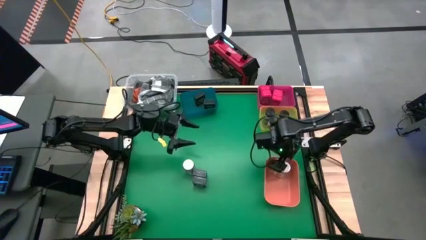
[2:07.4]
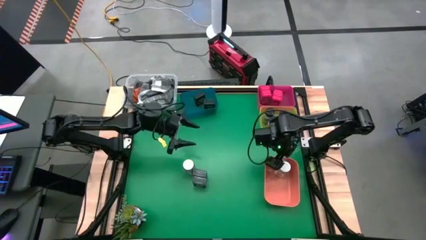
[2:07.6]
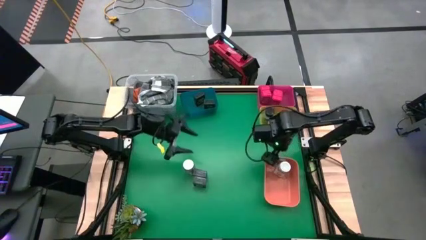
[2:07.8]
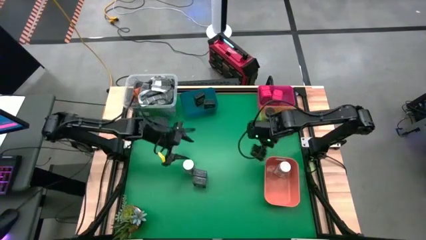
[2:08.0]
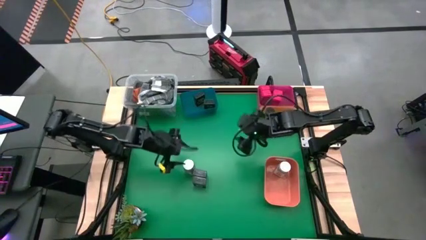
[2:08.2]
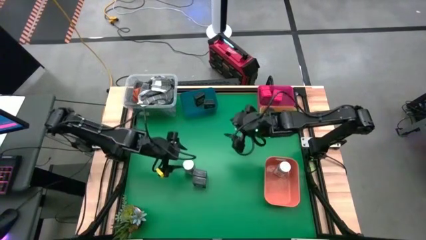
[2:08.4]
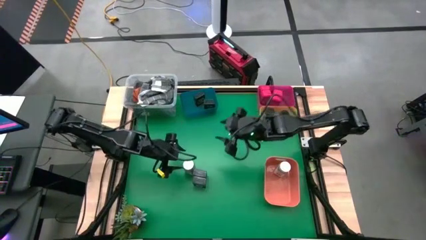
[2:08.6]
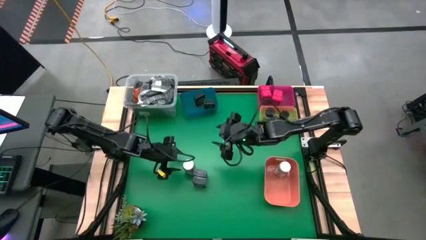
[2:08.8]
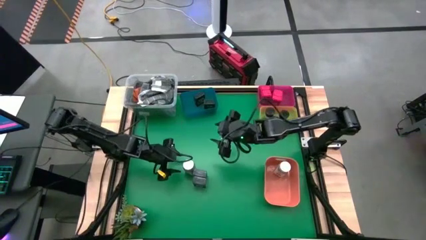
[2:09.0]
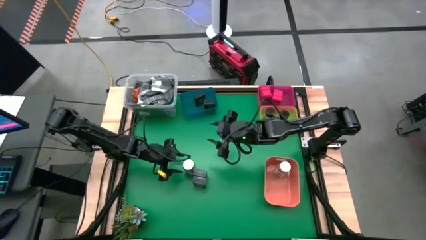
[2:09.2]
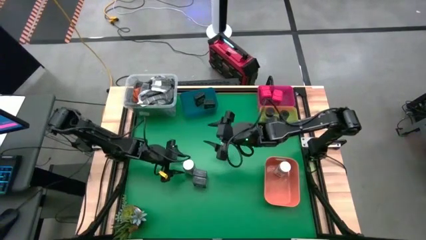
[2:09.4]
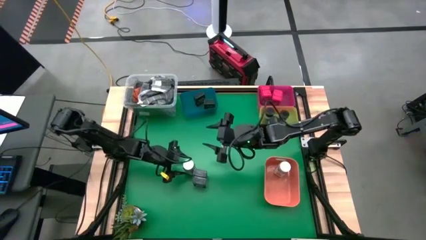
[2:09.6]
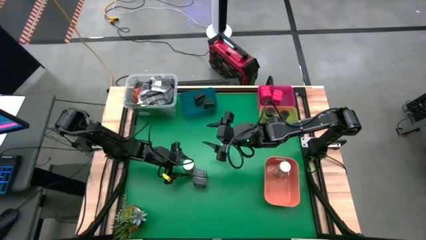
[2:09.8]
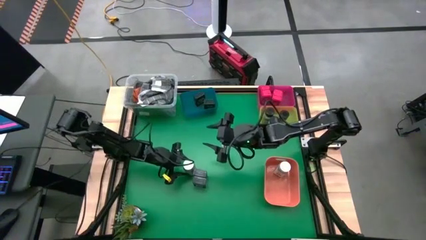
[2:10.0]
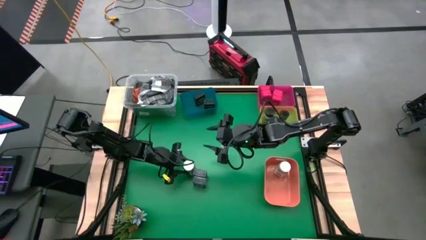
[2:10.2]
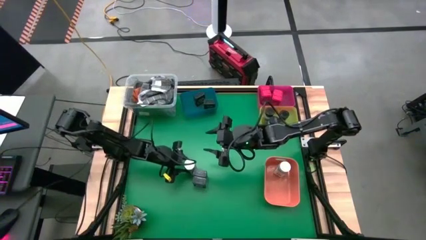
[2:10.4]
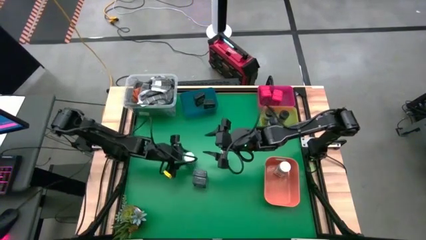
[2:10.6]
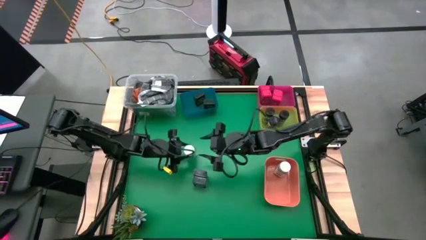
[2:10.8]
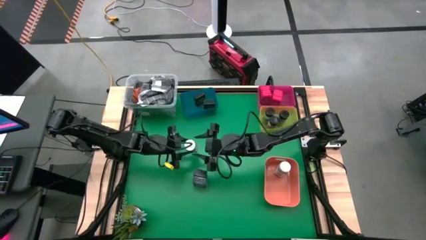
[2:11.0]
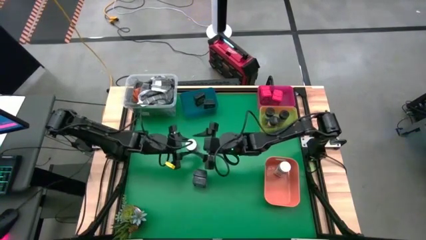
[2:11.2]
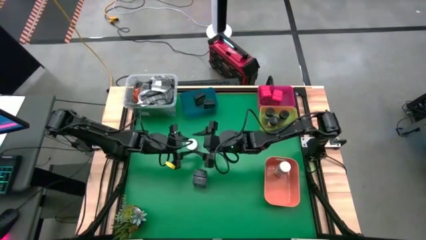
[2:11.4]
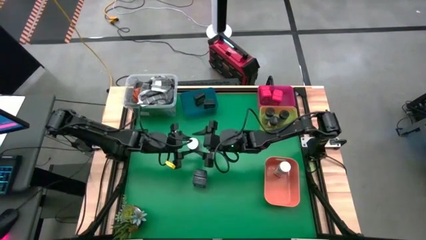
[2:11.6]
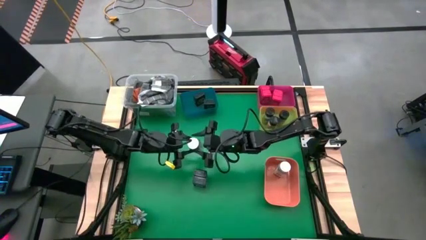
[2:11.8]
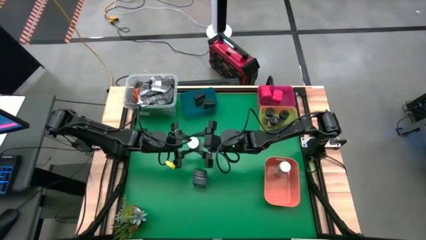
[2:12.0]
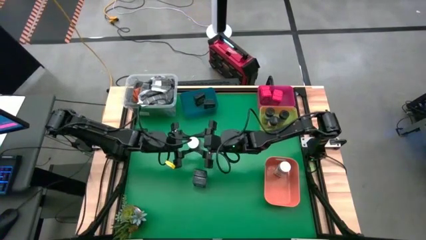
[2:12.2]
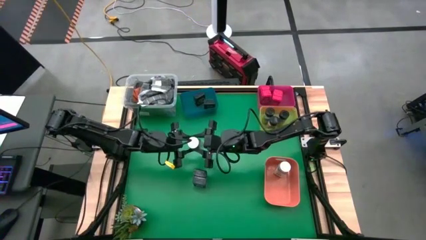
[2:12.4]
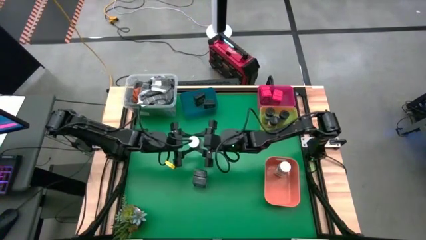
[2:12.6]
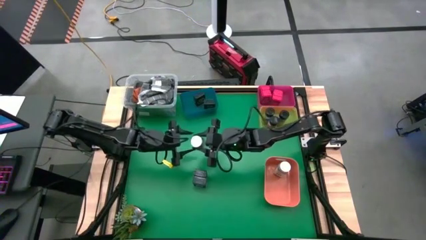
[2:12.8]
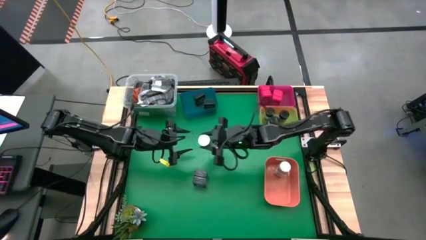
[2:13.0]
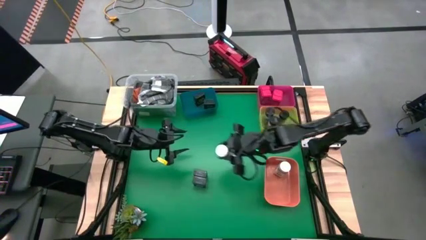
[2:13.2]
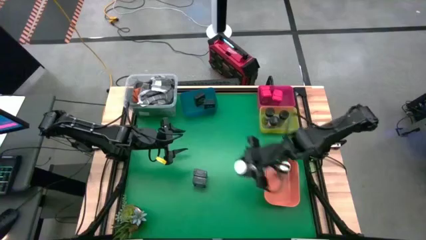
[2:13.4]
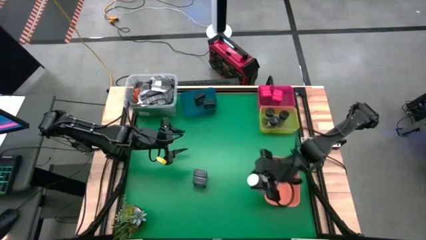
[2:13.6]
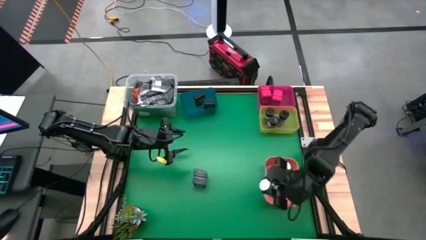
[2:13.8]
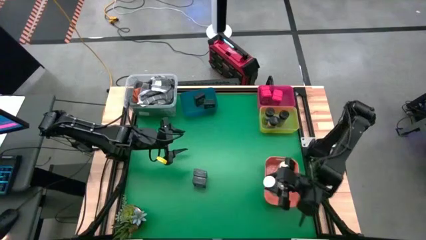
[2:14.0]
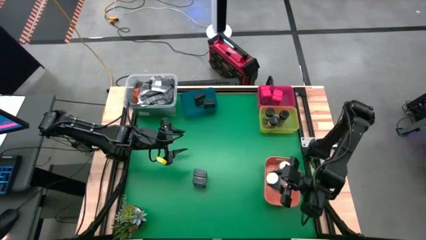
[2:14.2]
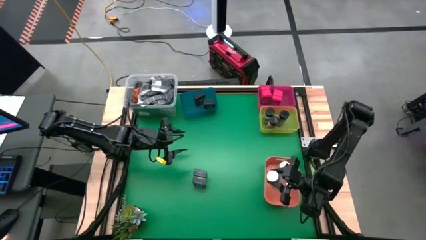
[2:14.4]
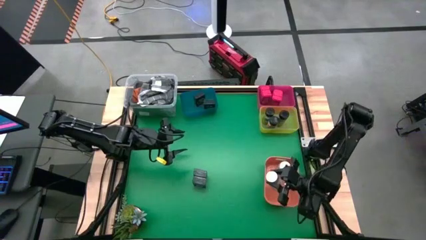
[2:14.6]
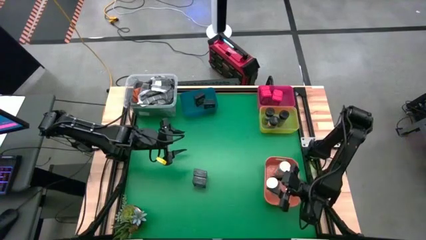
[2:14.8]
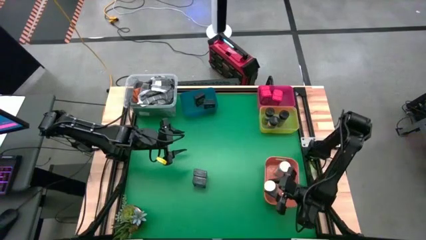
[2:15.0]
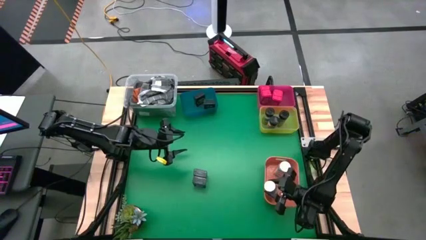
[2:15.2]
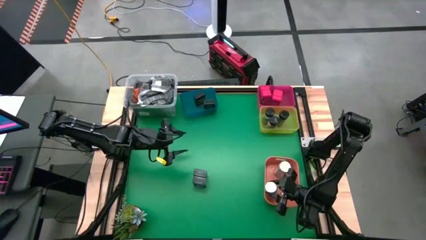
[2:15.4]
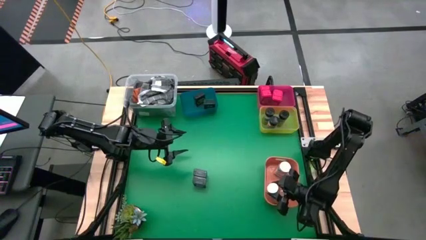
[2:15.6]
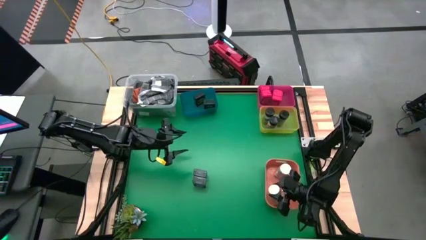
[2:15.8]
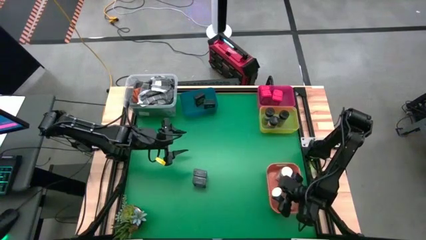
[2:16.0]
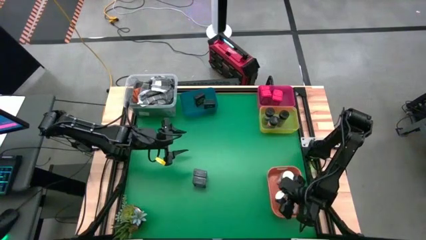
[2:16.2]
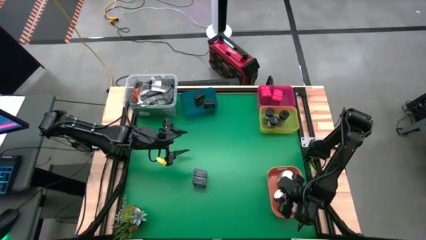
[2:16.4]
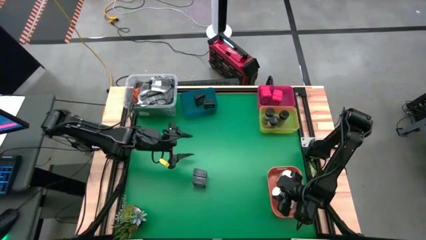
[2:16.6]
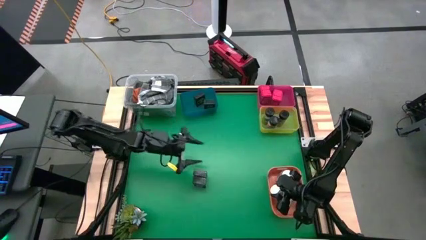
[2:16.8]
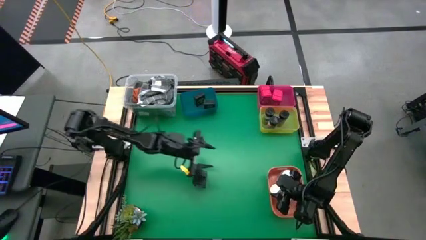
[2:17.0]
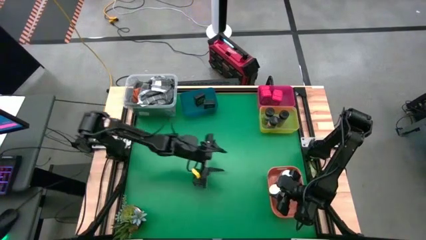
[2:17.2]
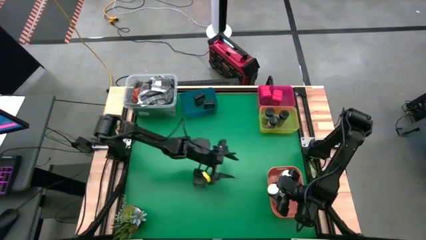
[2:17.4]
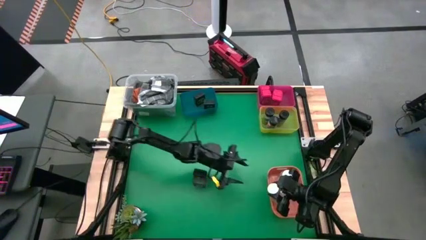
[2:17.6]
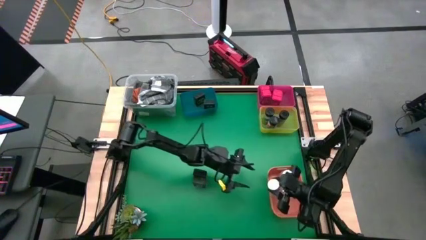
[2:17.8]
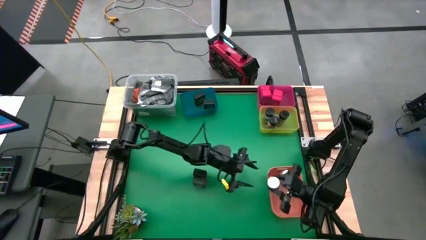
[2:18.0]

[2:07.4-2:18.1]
Task: Sort spices by type
Put the white seasoning from the middle into the orange bin

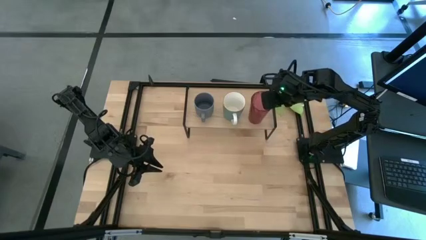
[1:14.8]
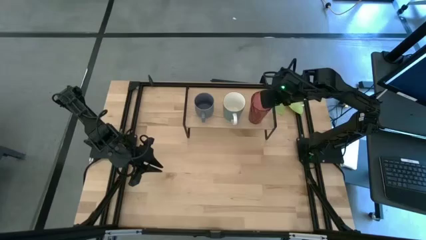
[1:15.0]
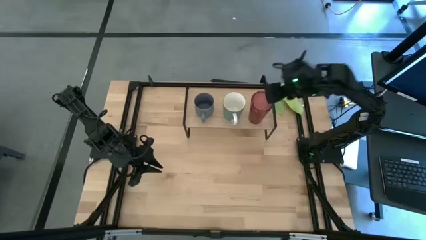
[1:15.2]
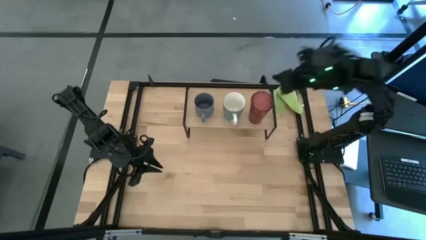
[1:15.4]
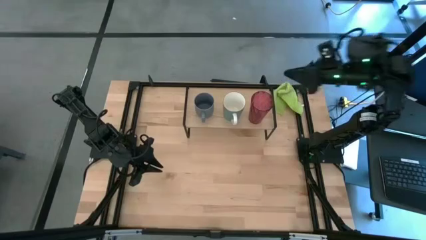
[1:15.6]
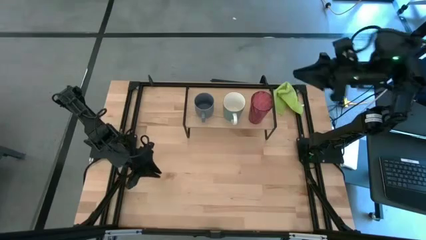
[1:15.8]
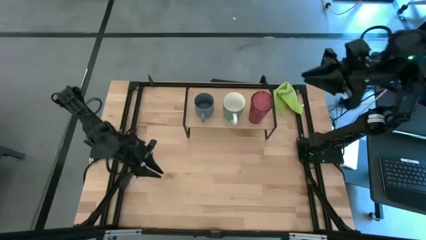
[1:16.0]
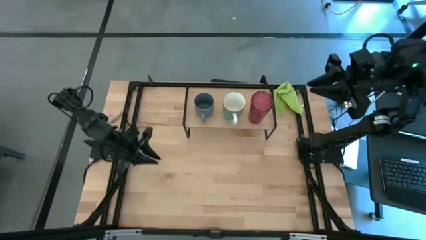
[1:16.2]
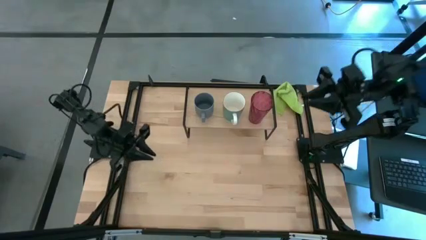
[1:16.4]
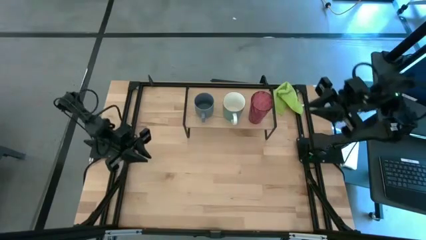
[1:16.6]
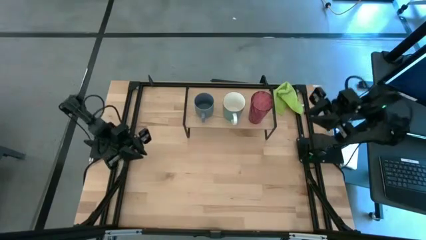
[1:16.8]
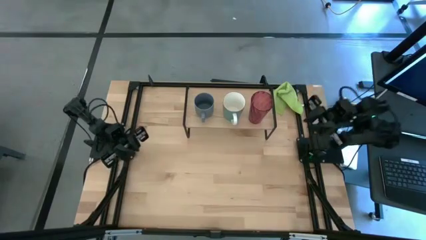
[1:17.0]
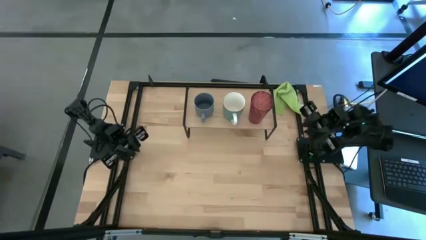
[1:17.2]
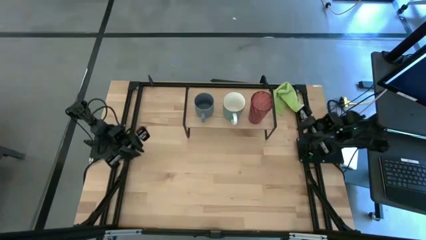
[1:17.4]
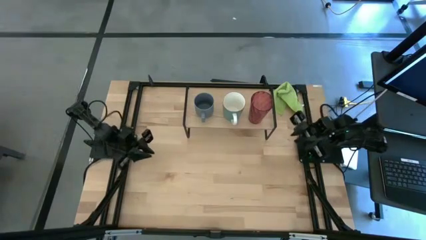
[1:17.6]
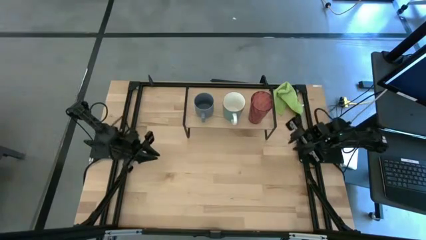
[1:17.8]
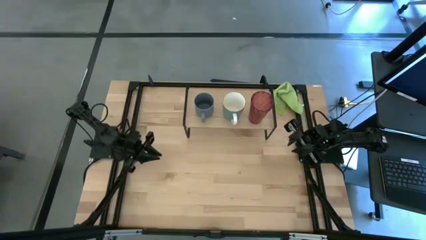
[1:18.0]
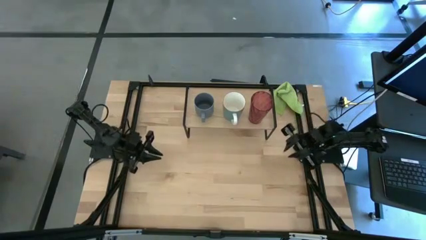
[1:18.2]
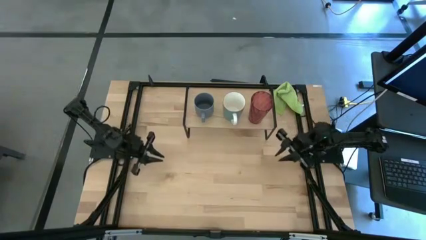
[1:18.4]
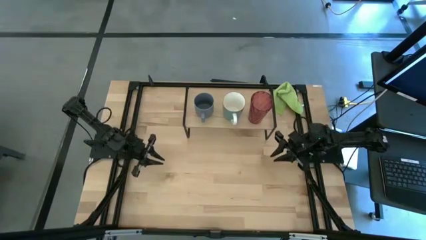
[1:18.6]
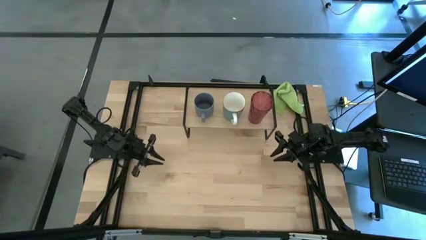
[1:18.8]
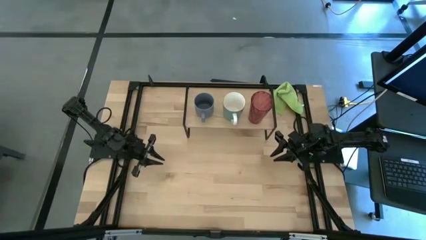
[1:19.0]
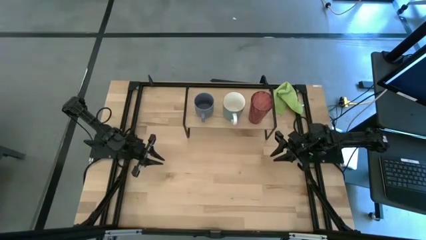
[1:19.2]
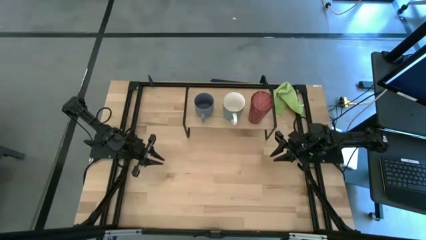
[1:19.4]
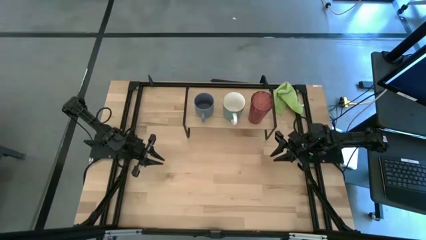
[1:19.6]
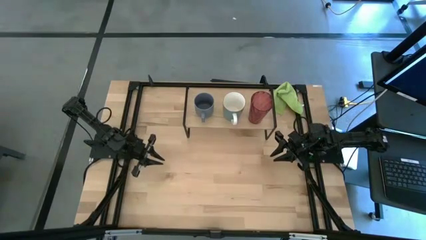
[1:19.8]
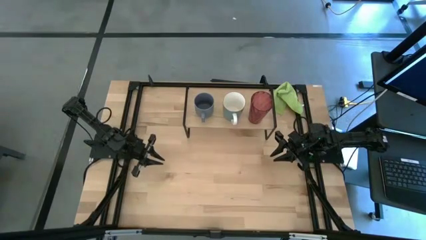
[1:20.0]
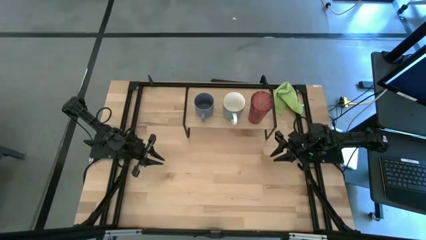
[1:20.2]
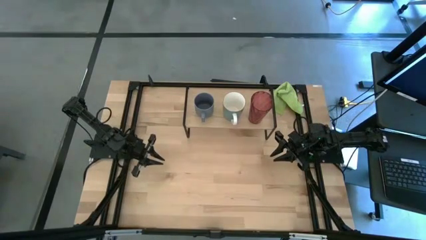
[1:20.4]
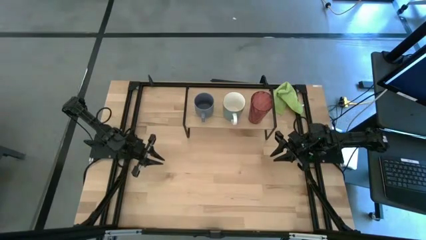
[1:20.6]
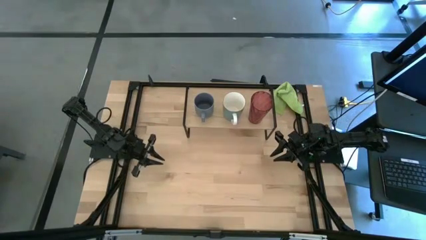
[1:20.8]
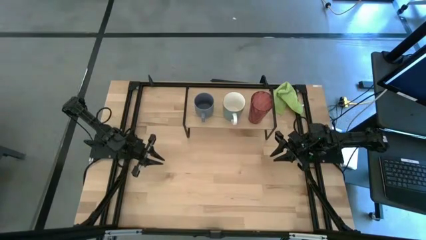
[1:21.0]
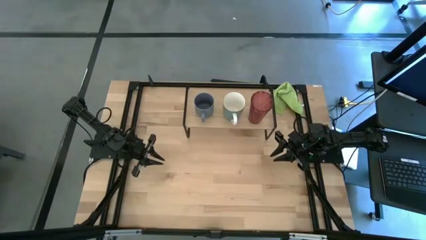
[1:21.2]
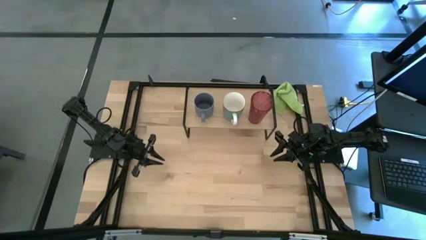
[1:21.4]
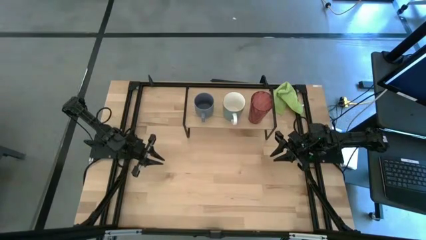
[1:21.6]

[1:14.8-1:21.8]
Task: Stack small to large cups/mugs on shelf
Return to Home Position
